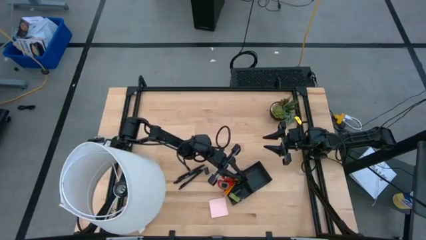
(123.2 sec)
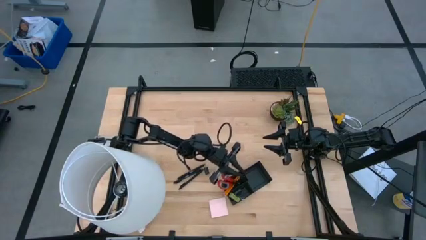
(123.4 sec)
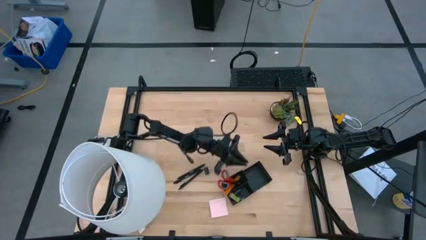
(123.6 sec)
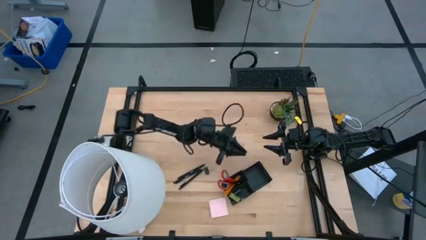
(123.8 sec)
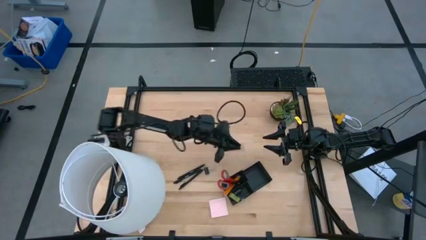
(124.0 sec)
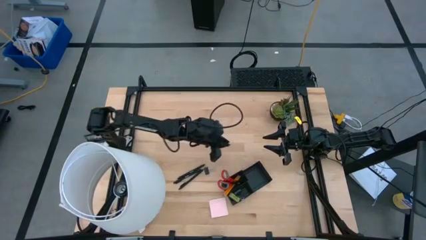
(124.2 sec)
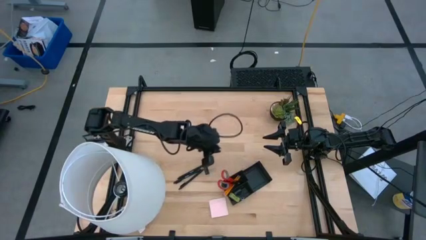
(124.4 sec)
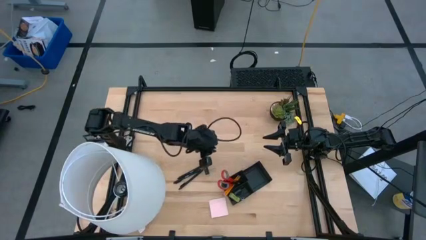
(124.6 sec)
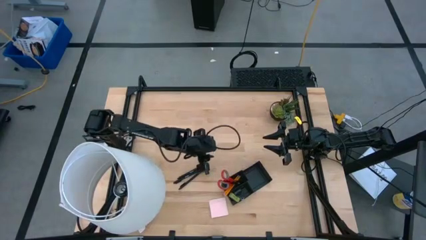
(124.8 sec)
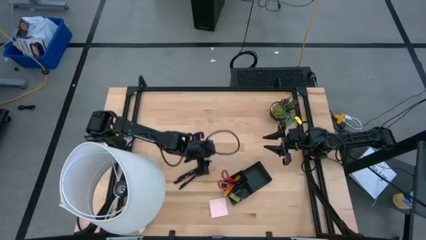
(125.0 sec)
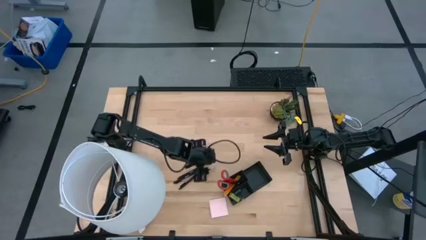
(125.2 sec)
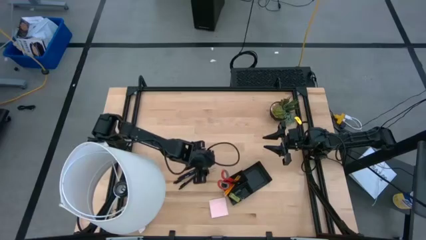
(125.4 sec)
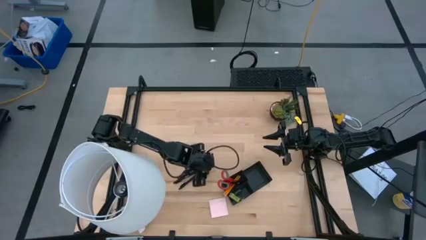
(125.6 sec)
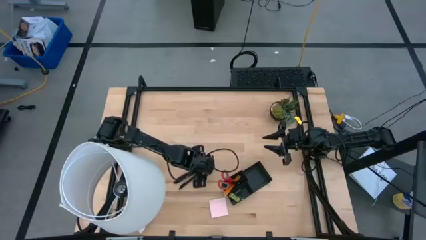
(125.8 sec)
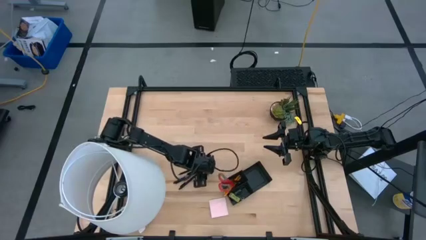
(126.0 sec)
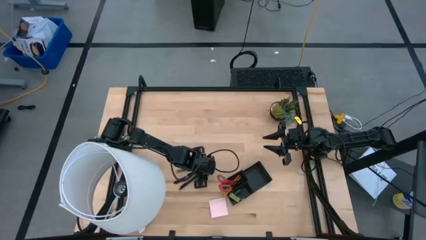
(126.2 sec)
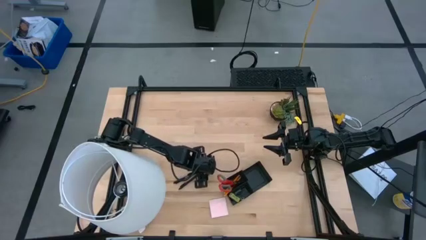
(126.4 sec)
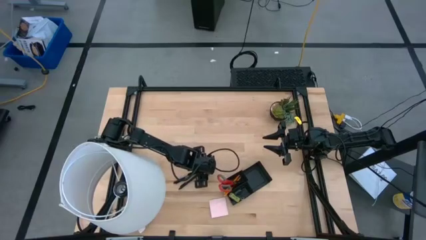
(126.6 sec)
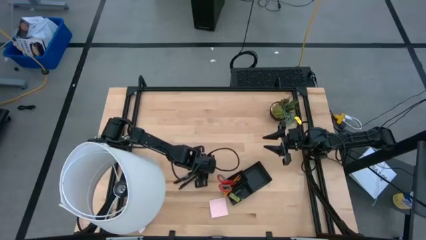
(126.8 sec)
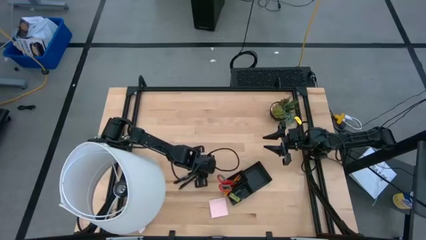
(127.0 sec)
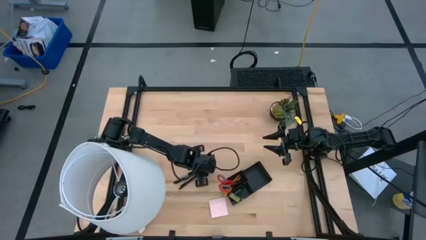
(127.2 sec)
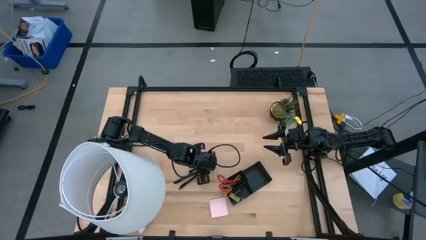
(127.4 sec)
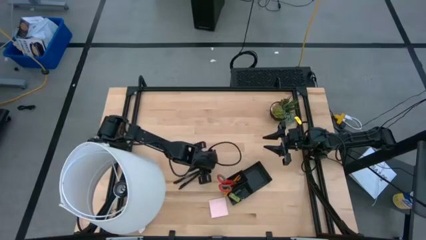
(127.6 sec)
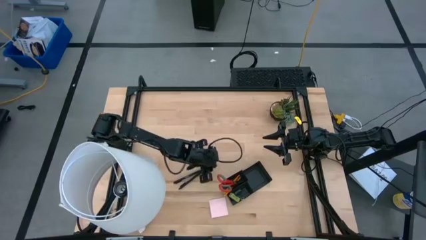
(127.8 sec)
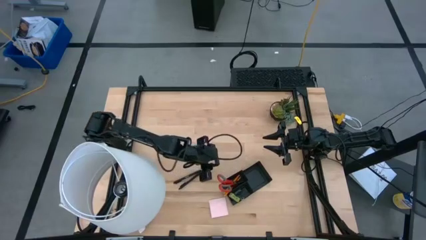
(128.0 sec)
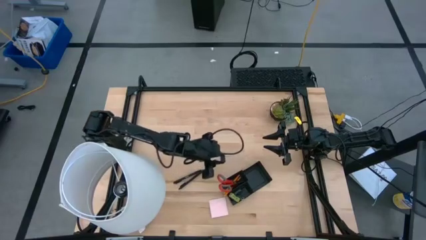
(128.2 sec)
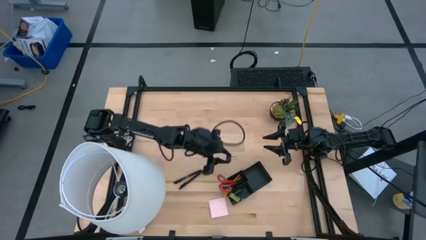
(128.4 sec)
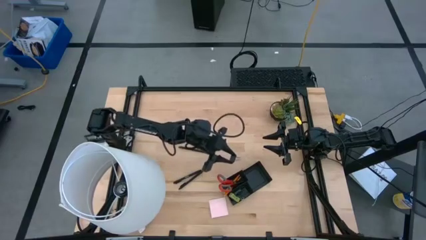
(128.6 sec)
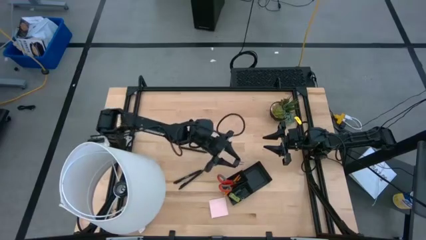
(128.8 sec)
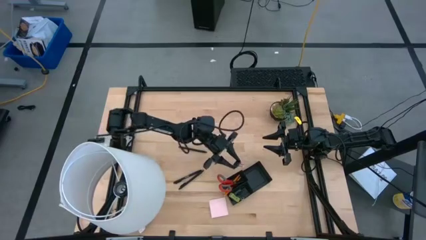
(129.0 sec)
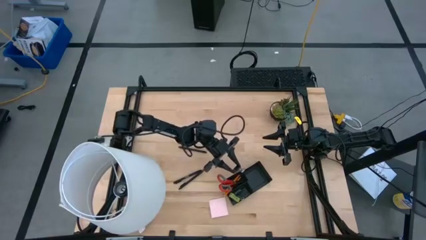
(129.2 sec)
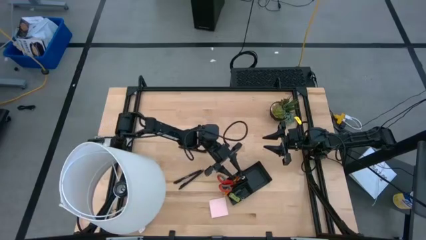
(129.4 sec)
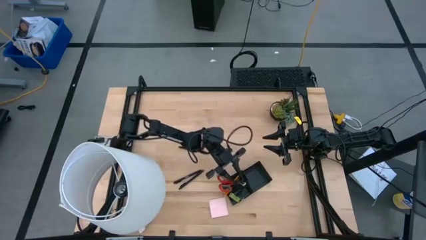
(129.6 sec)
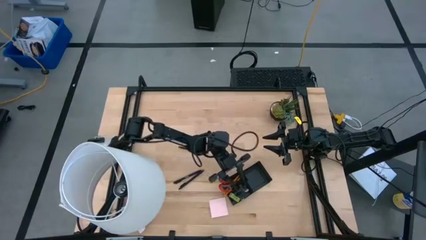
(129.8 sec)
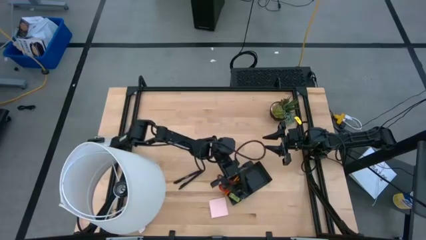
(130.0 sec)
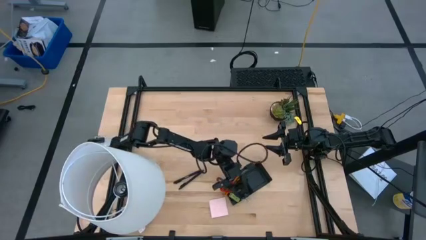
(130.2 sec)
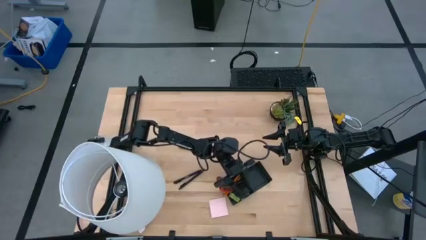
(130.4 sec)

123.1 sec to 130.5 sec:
Task: Pick and place office supplies into organizer
Put the black binder clip into the black desk organizer

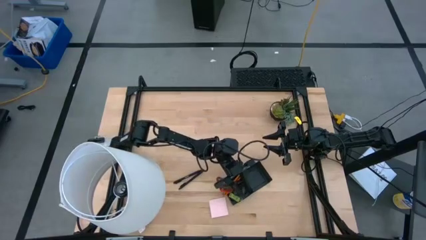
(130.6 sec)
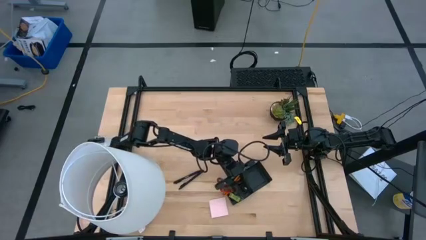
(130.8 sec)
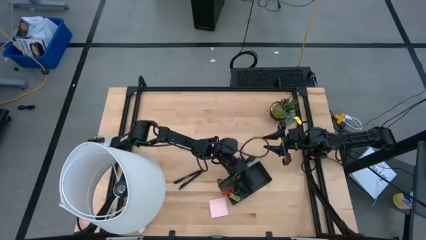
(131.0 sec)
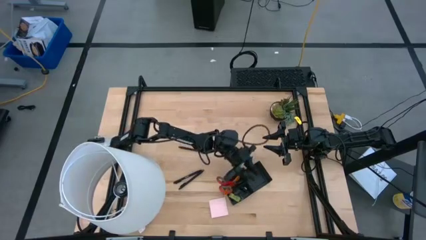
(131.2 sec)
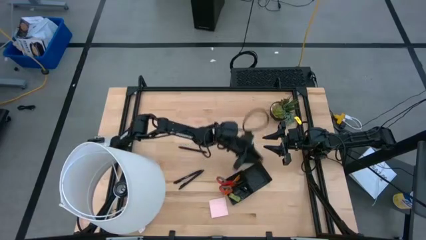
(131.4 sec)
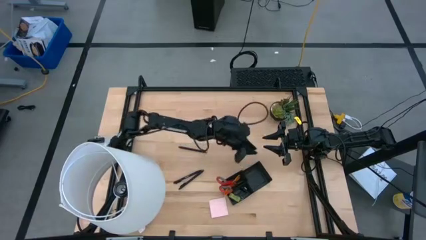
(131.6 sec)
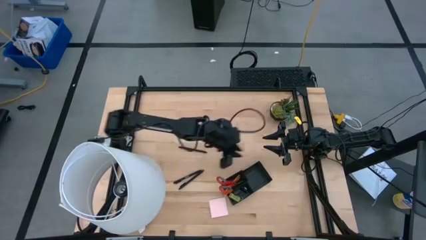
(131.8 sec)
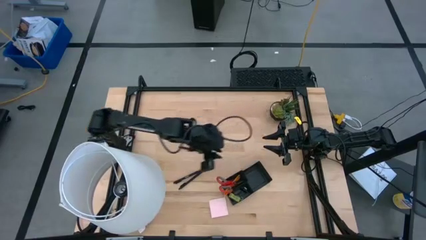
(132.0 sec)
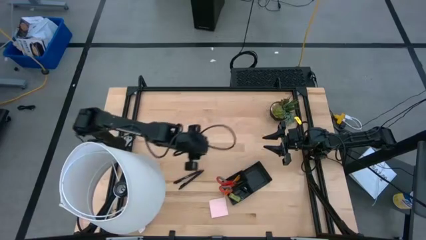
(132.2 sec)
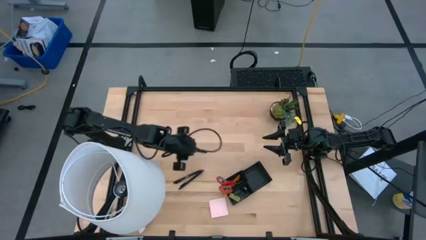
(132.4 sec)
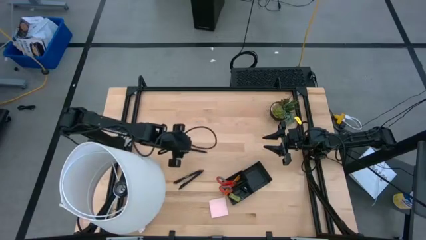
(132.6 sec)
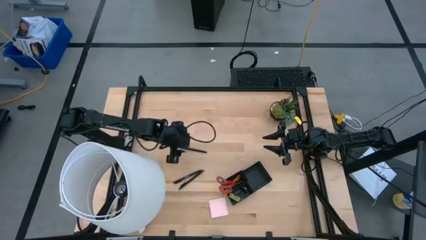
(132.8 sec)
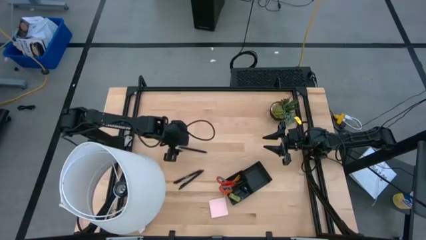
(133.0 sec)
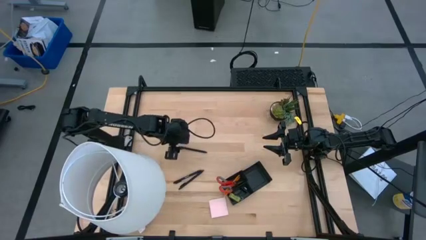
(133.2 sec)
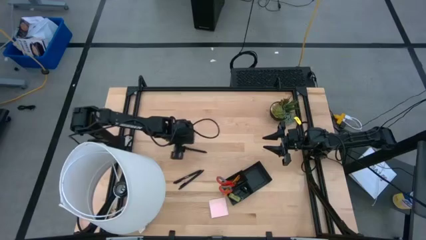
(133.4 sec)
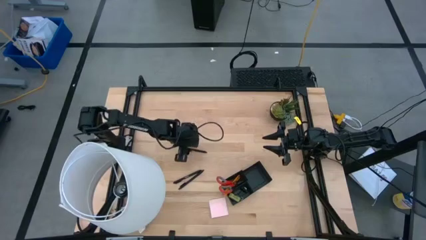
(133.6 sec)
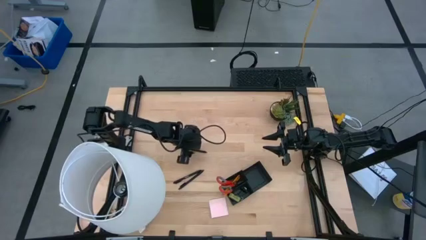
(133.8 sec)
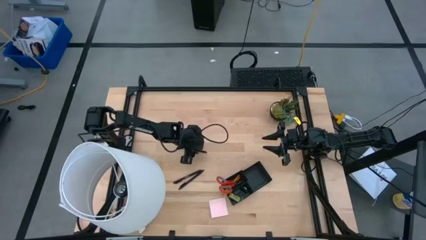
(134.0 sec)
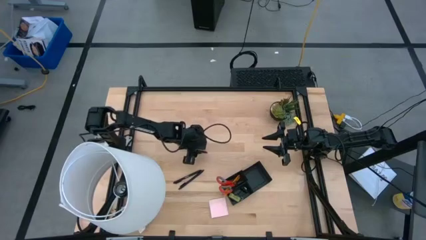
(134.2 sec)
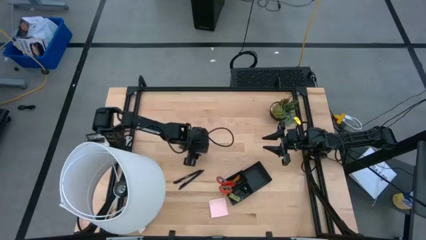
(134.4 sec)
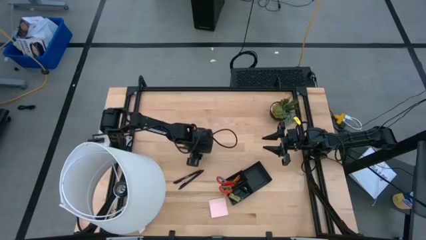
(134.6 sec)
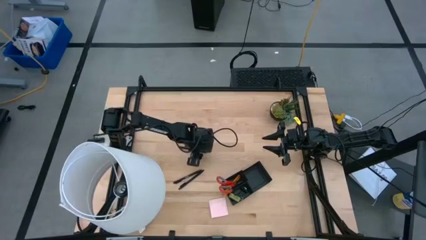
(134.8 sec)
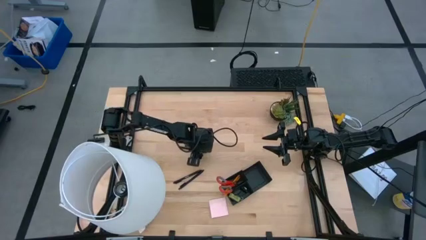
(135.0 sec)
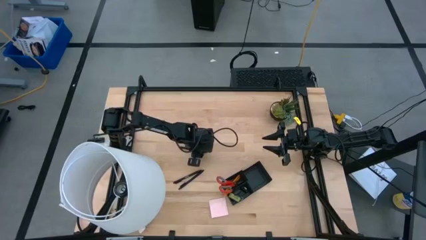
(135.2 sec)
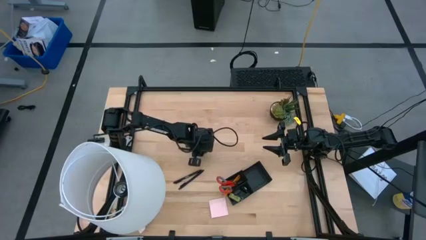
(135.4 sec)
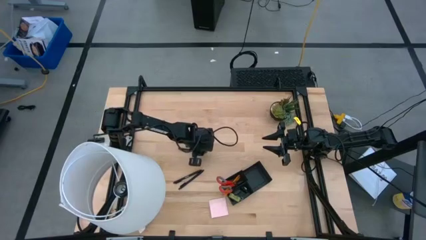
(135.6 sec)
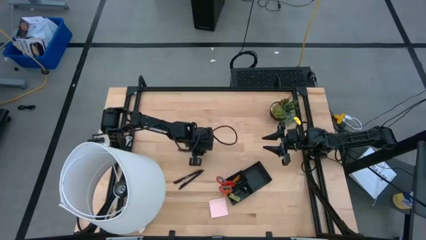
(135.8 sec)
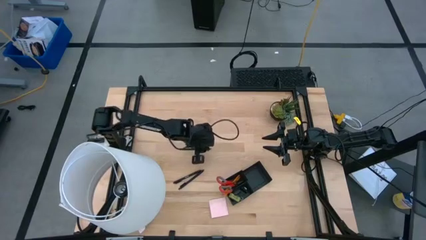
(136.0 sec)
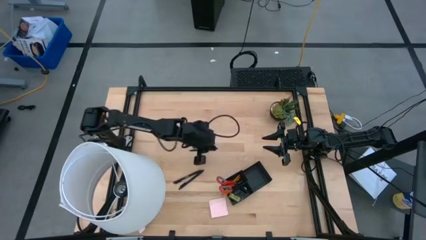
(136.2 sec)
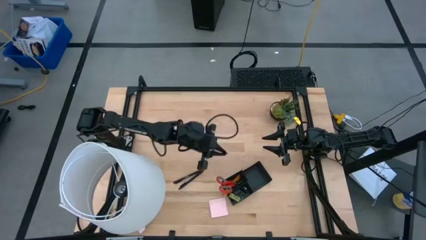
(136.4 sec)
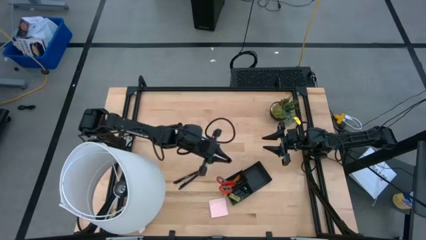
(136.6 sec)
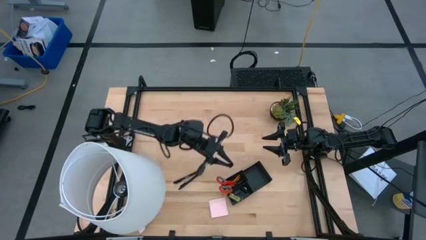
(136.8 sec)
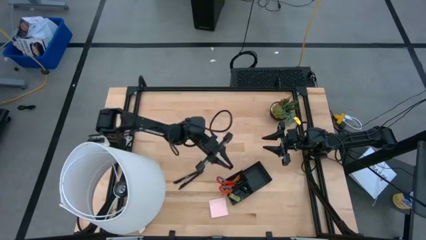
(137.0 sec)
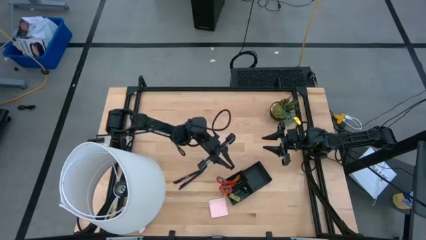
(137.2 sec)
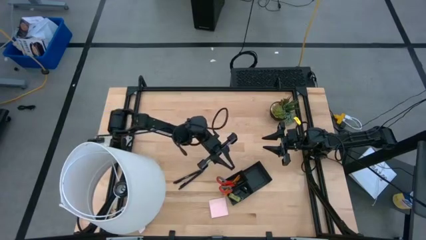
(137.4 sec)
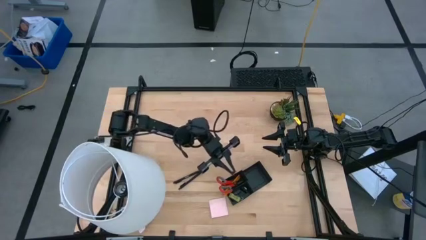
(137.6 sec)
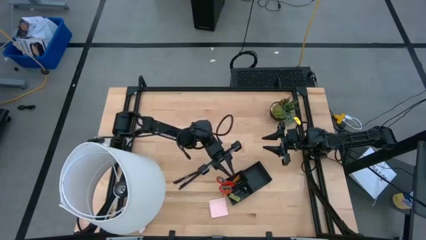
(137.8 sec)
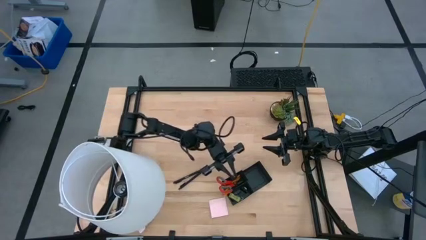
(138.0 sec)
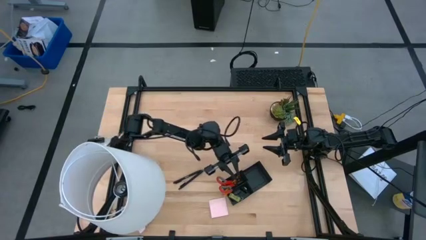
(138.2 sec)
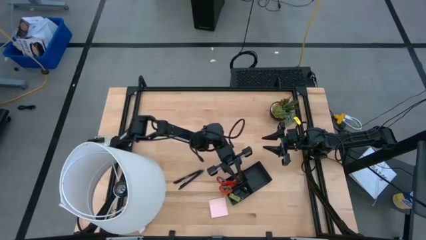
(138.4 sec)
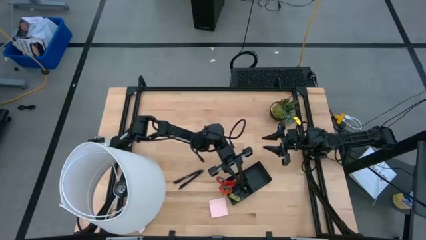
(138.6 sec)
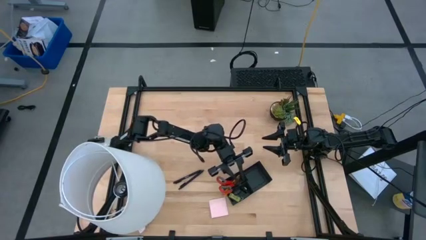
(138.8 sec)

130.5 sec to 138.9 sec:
Put the black pen into the black desk organizer
